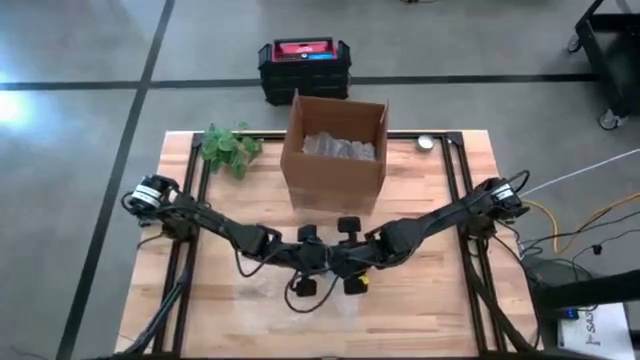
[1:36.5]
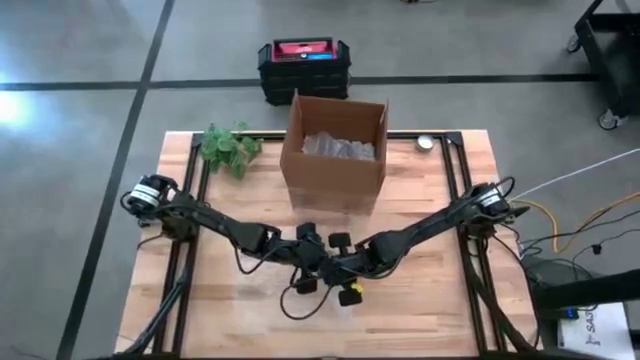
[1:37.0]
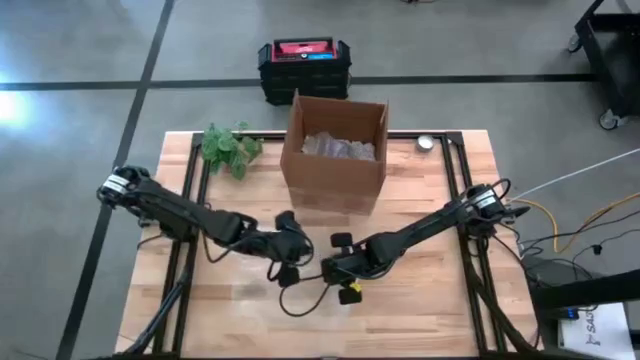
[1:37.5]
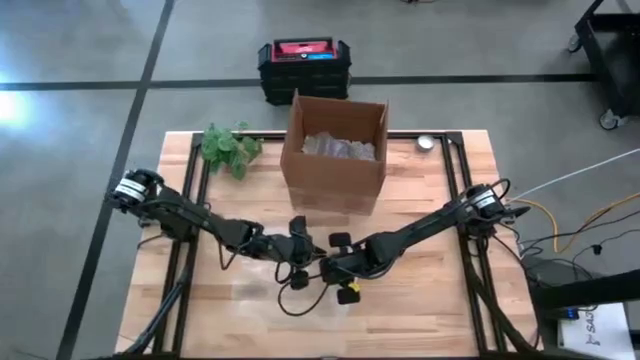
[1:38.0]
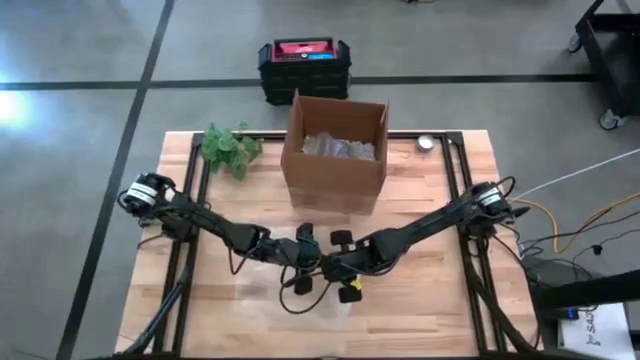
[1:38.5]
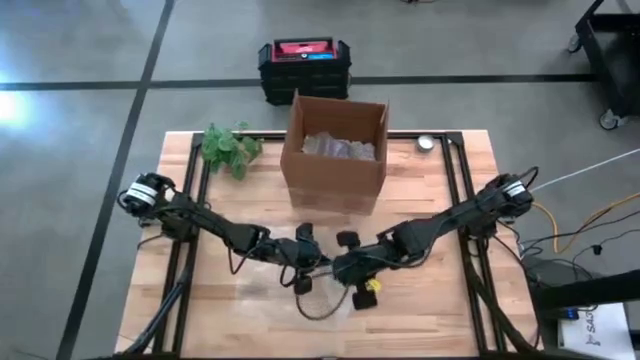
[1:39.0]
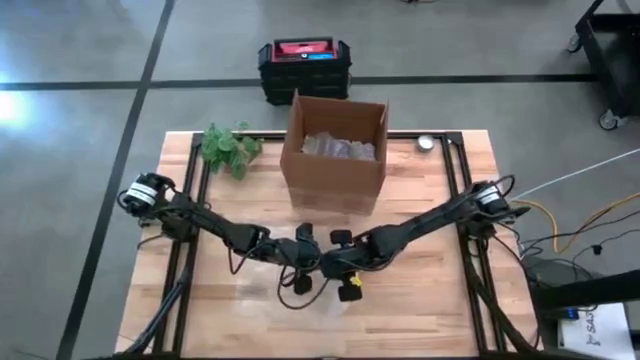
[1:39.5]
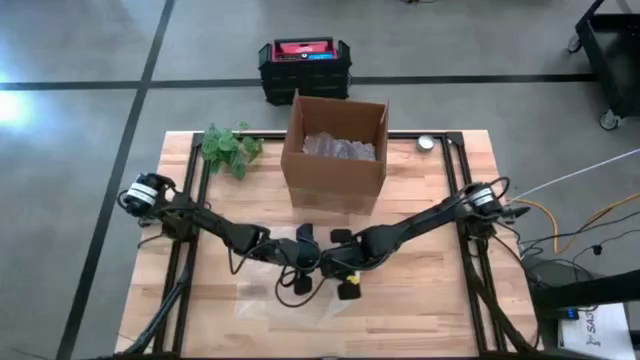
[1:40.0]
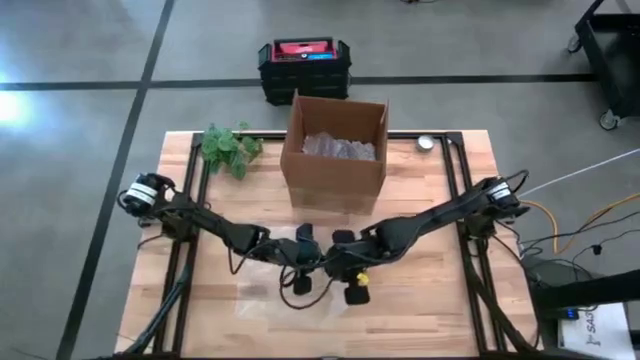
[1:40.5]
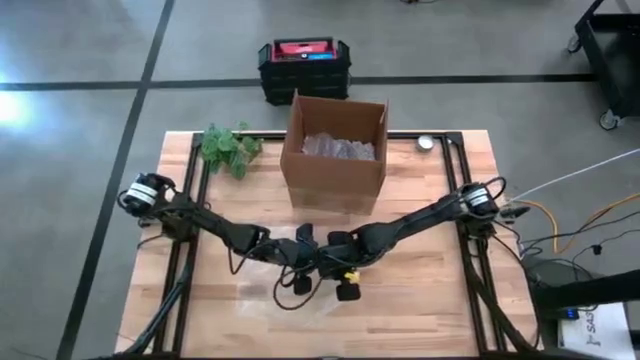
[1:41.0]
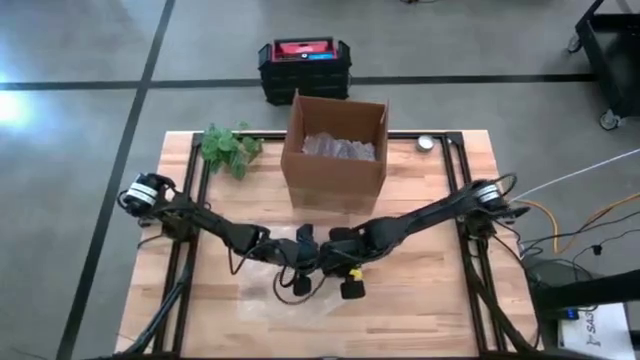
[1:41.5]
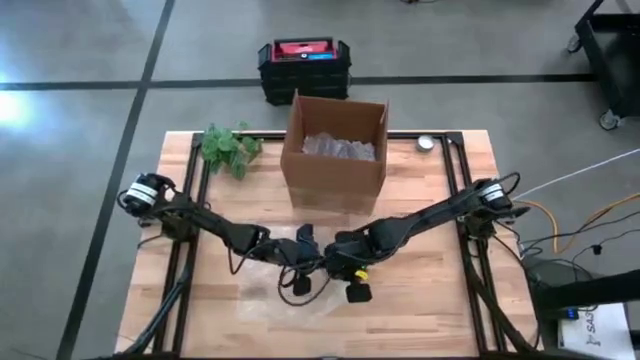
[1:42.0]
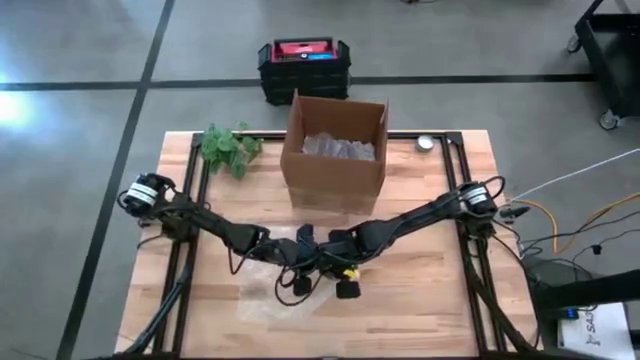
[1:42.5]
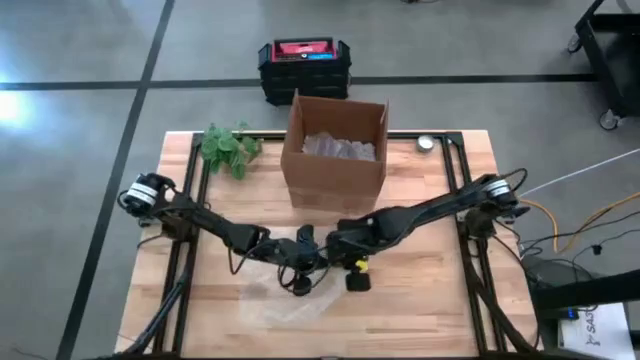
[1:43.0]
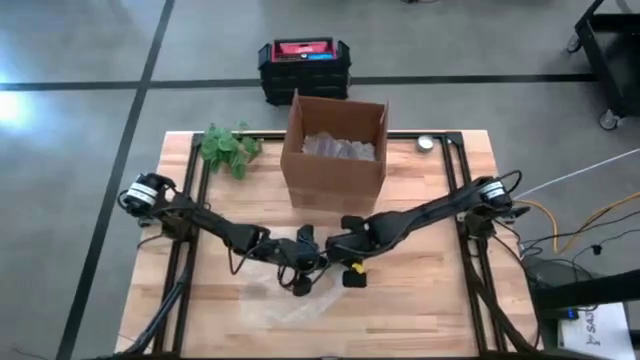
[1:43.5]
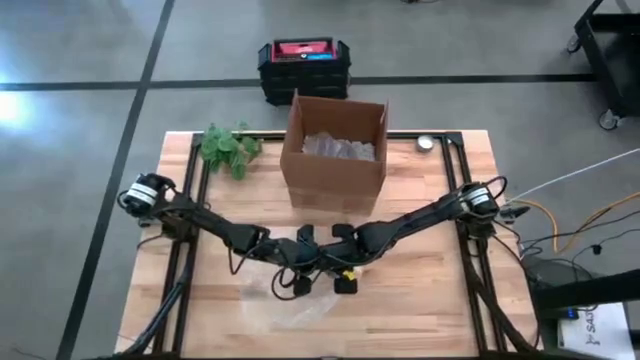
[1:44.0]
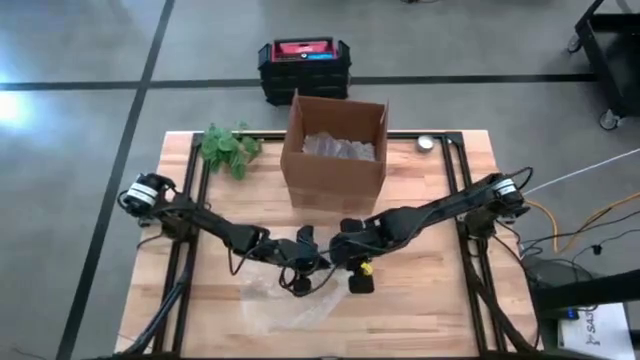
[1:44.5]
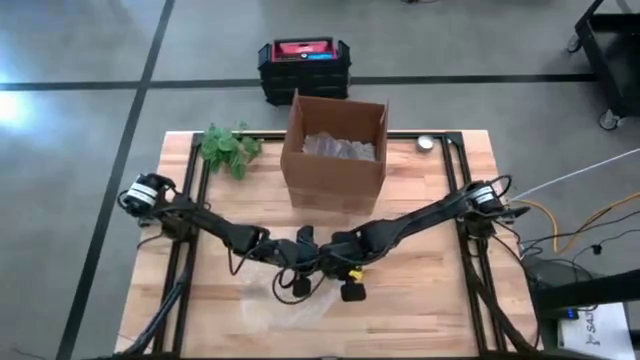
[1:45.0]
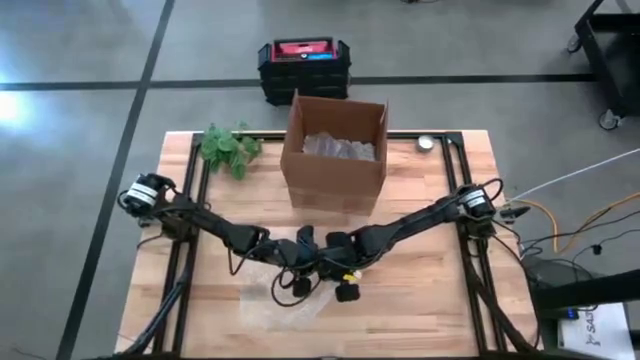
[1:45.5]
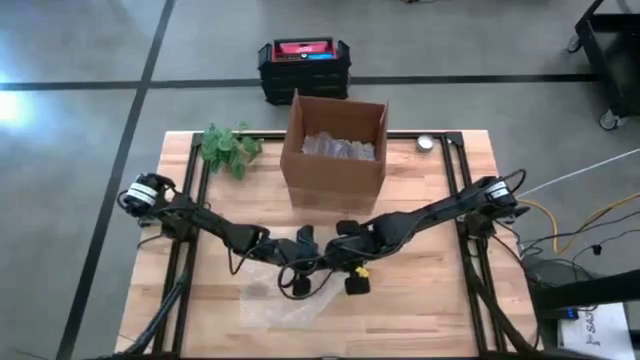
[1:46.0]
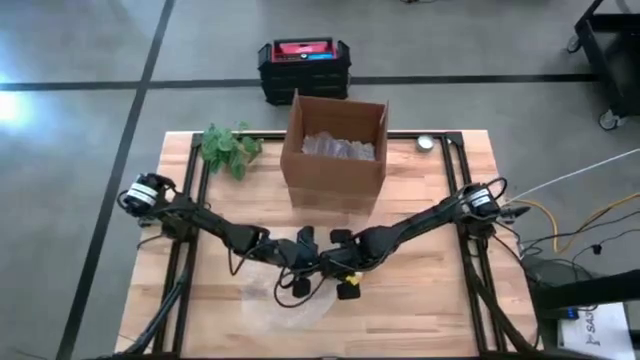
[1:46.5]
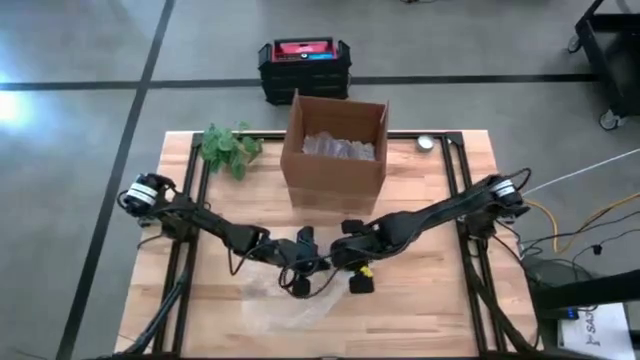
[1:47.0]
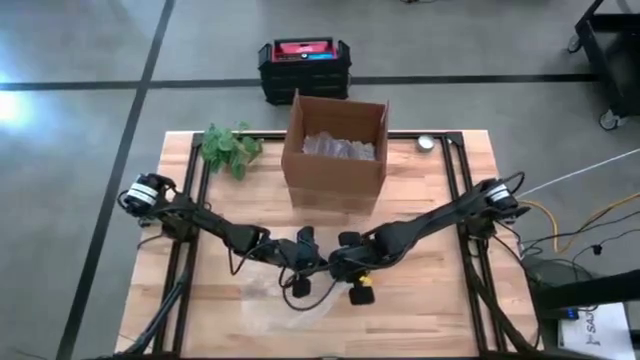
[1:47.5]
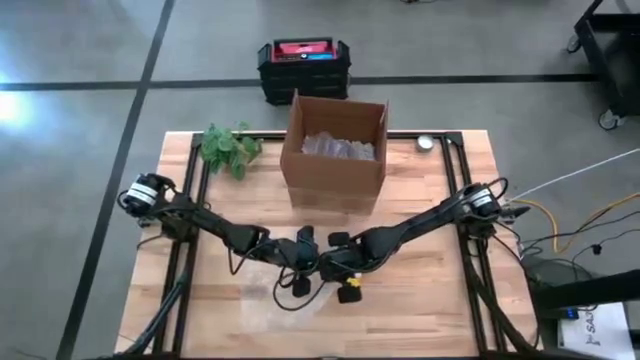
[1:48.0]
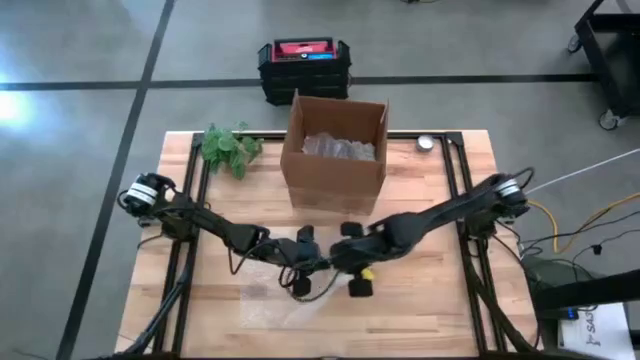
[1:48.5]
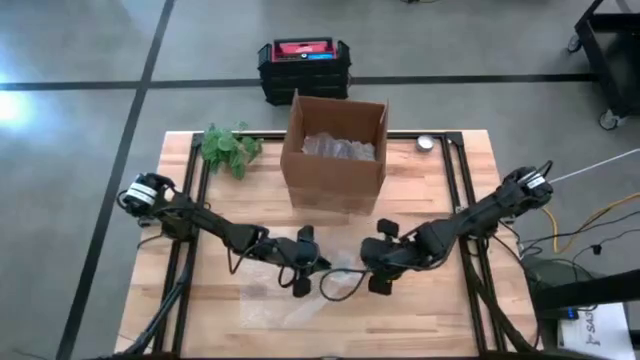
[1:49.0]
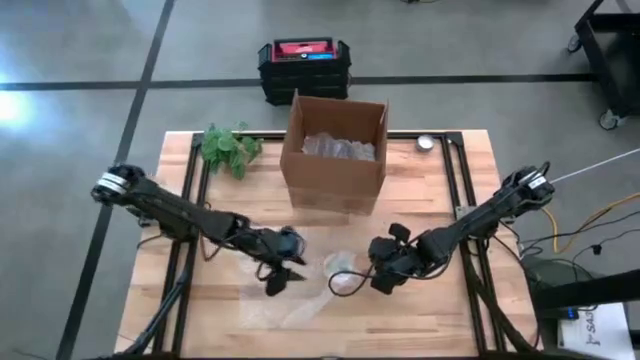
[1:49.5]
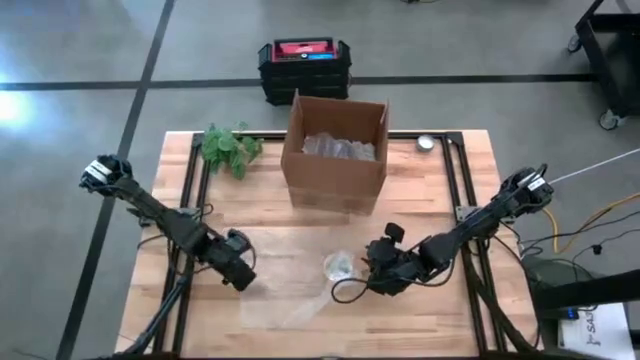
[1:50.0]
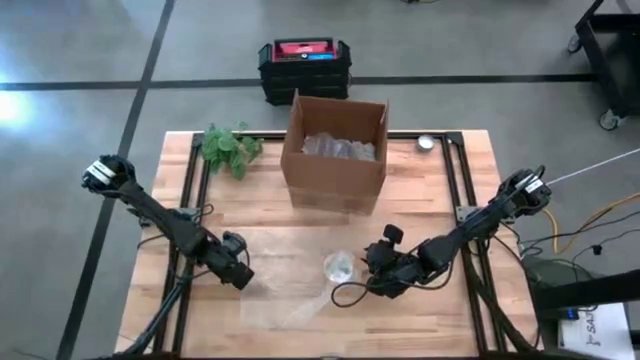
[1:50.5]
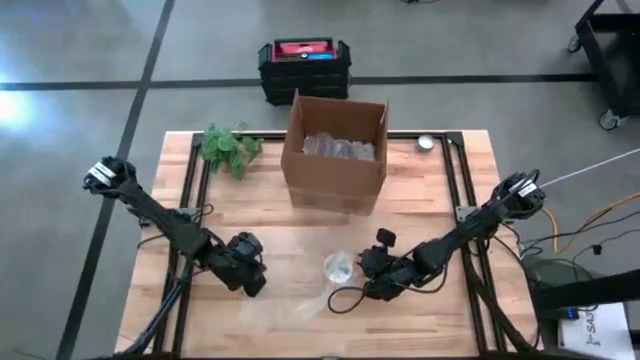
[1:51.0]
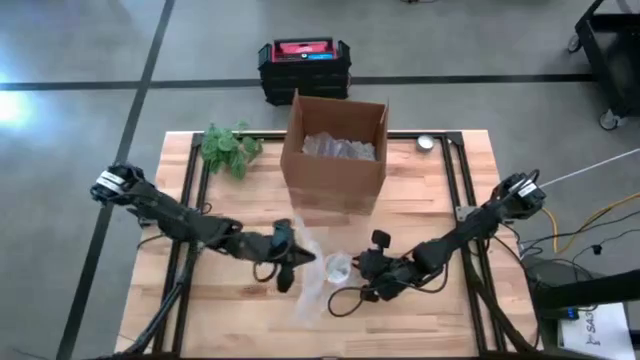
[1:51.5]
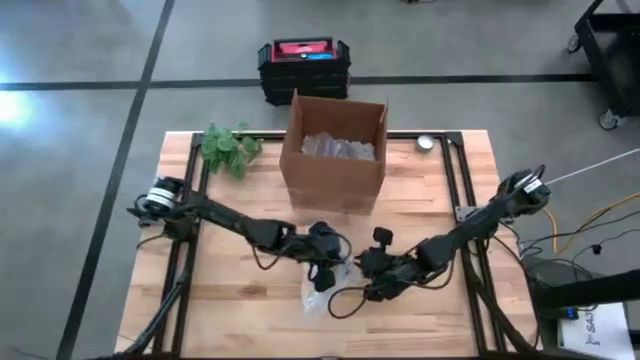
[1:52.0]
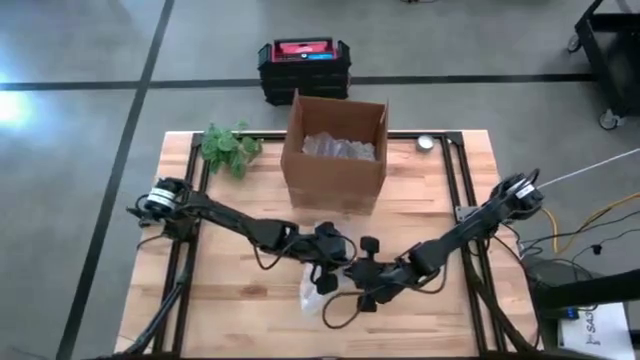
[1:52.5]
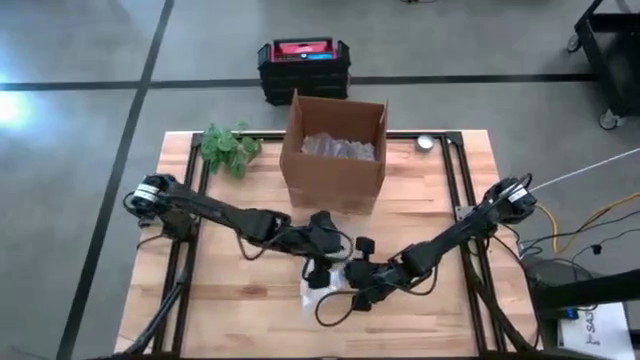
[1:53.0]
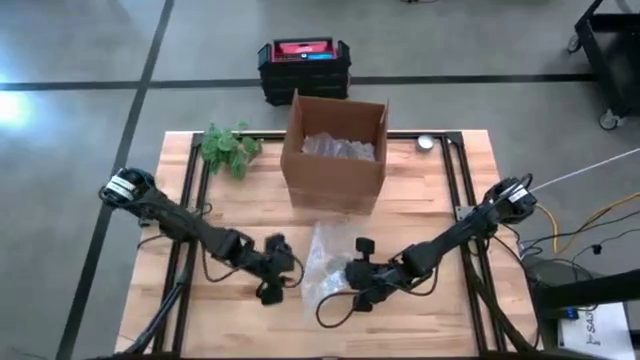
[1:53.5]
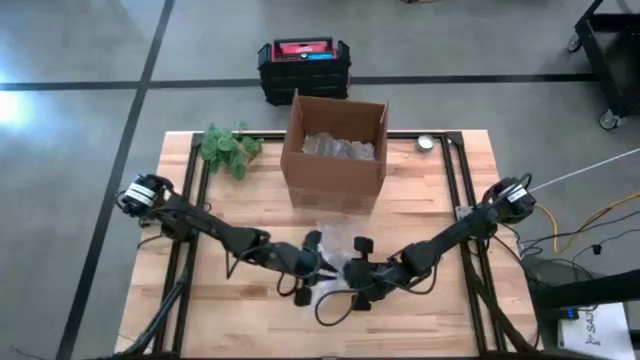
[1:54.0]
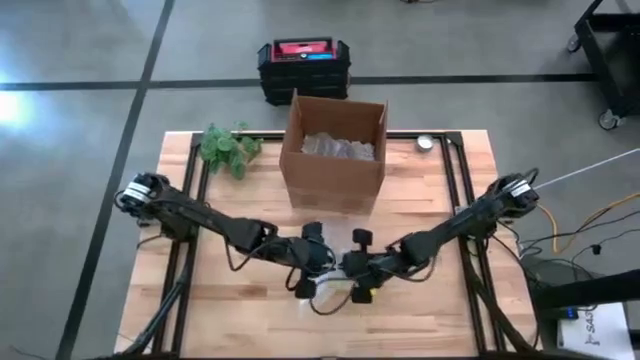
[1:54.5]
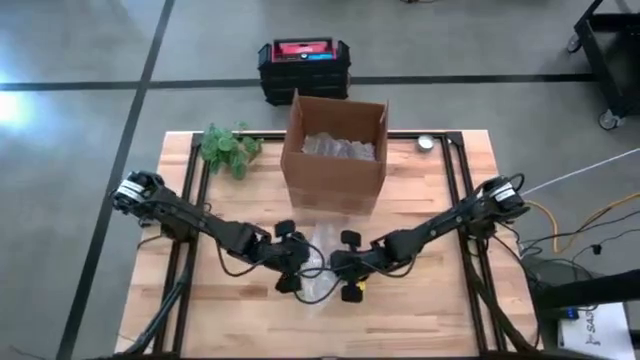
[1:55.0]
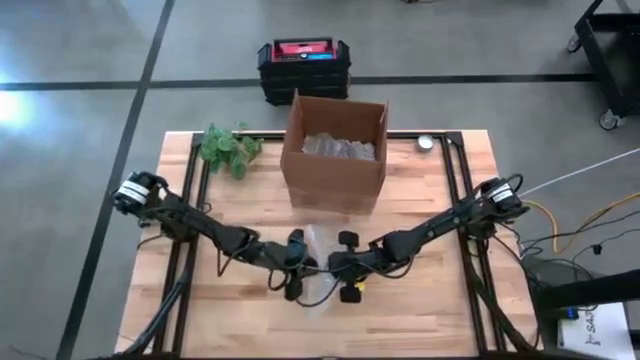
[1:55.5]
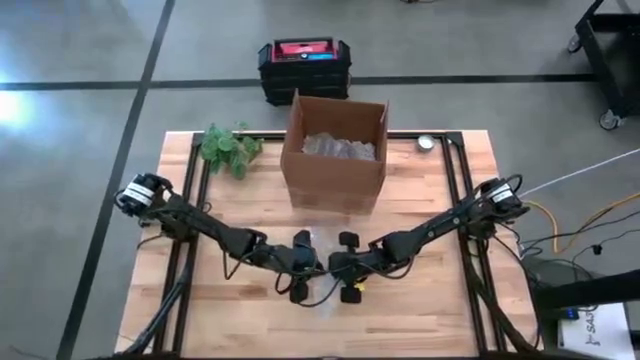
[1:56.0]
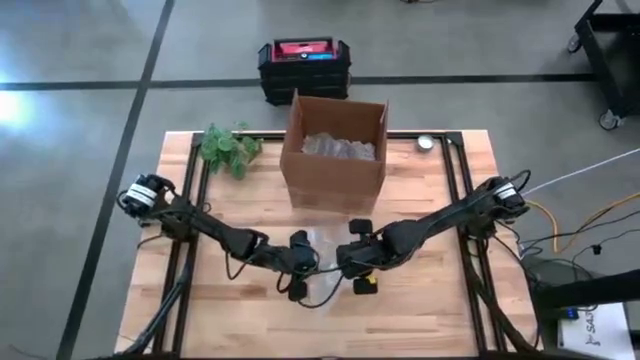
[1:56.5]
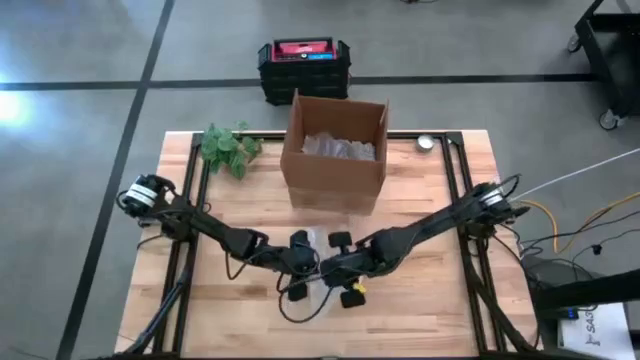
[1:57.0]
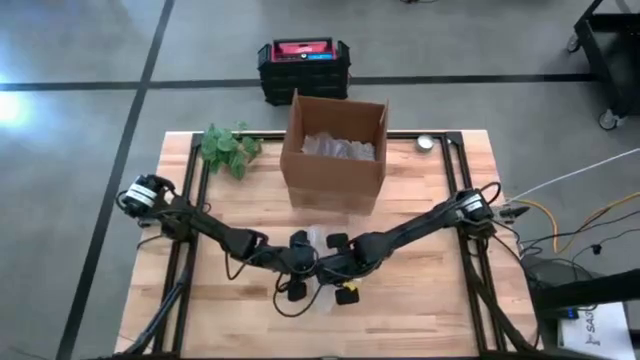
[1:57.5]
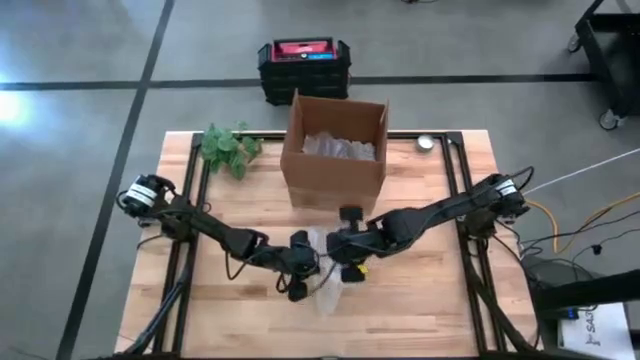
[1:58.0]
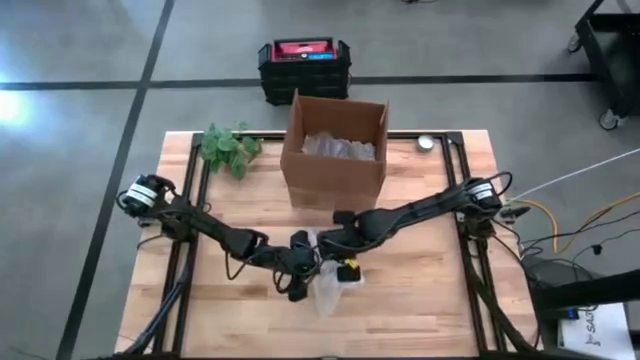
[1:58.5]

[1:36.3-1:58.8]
Task: wrap mug
Wrap the yellow cup in bubble wrap
